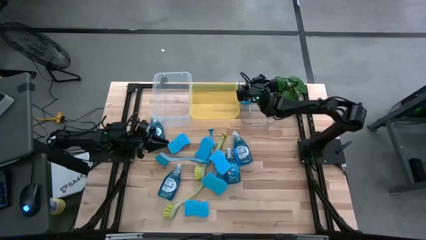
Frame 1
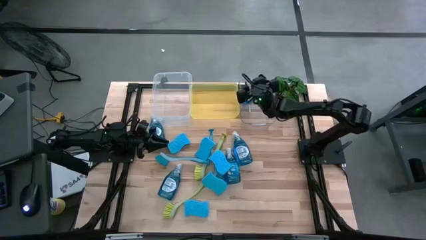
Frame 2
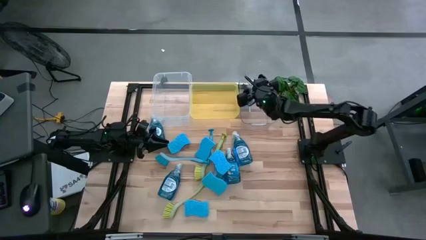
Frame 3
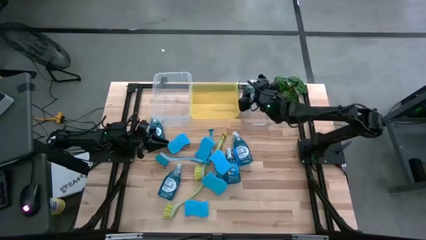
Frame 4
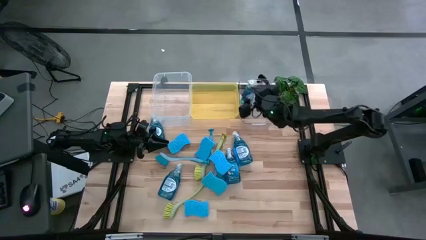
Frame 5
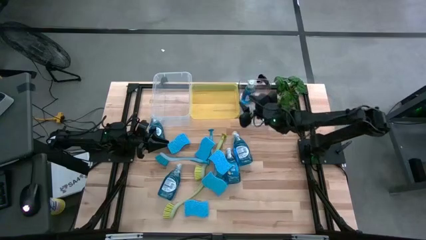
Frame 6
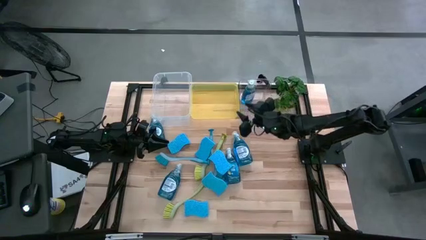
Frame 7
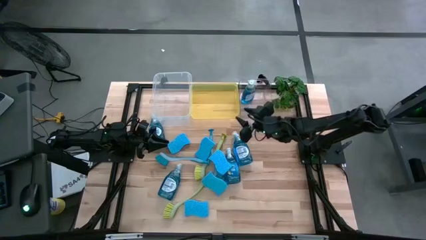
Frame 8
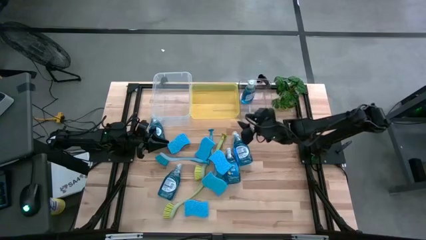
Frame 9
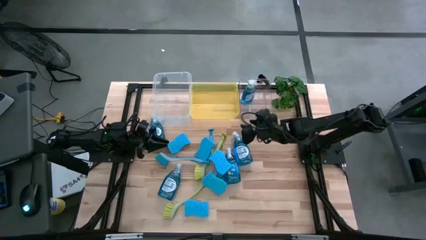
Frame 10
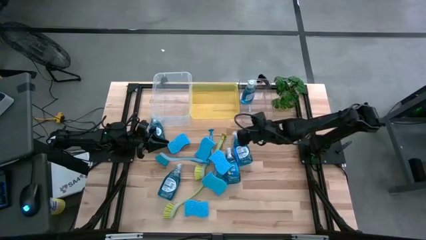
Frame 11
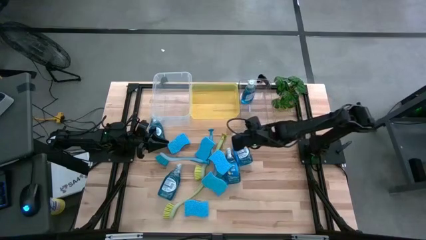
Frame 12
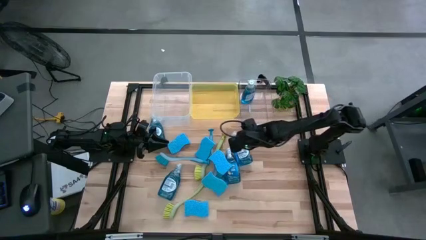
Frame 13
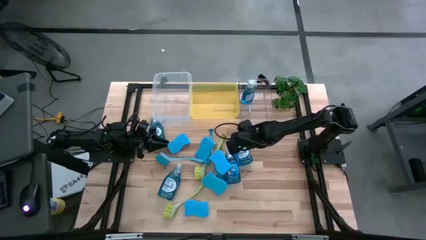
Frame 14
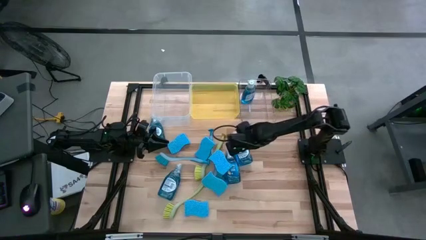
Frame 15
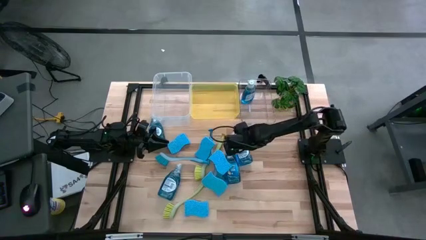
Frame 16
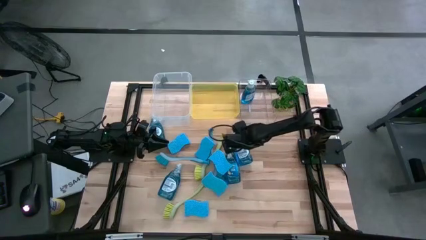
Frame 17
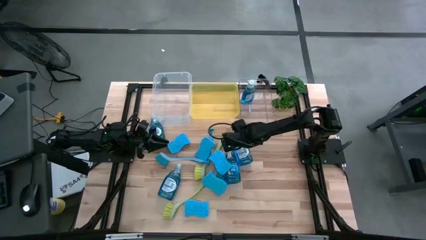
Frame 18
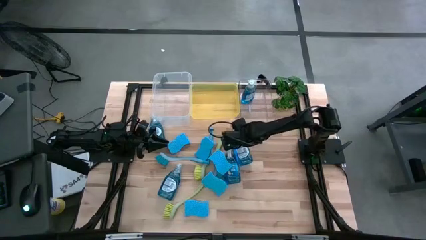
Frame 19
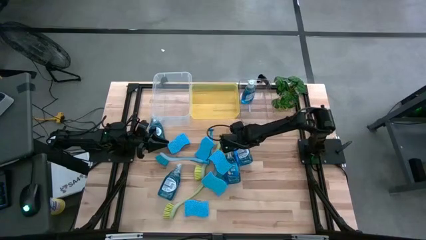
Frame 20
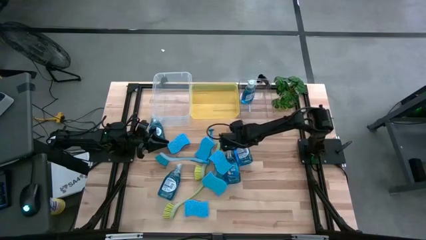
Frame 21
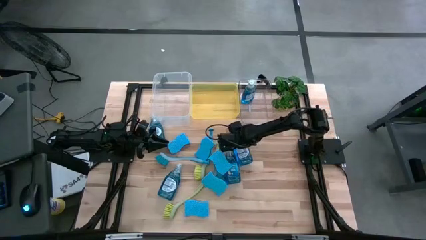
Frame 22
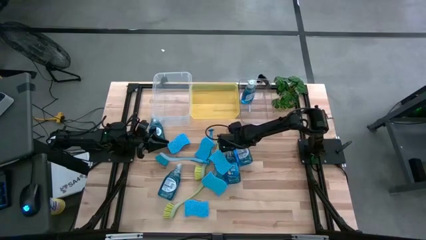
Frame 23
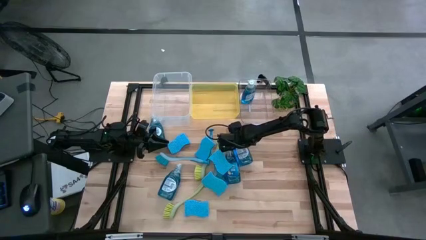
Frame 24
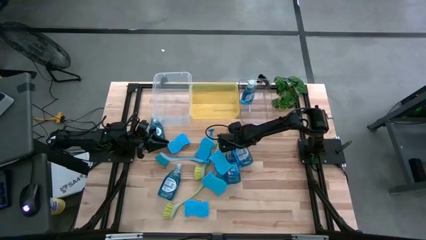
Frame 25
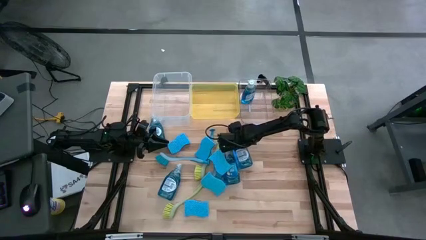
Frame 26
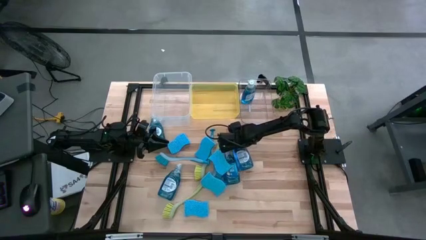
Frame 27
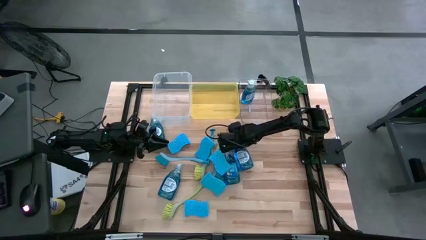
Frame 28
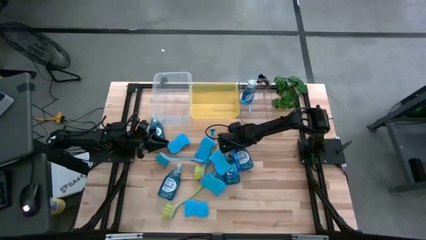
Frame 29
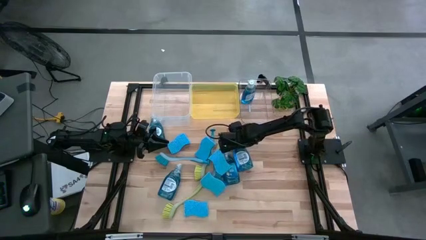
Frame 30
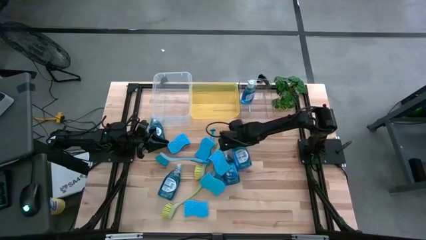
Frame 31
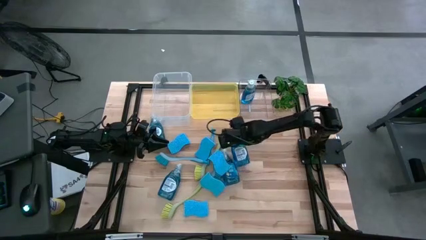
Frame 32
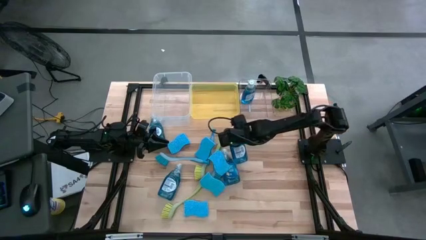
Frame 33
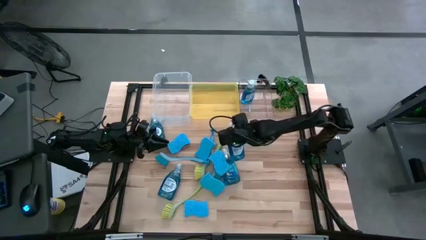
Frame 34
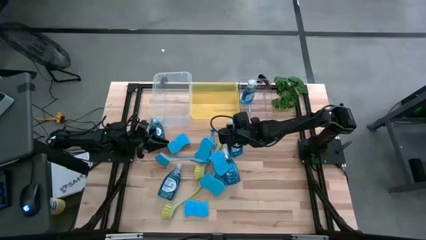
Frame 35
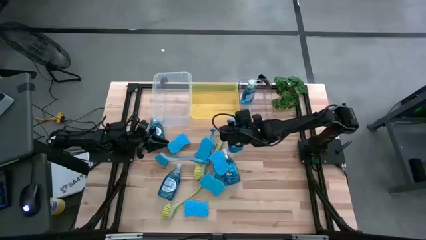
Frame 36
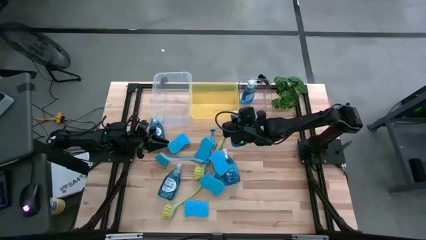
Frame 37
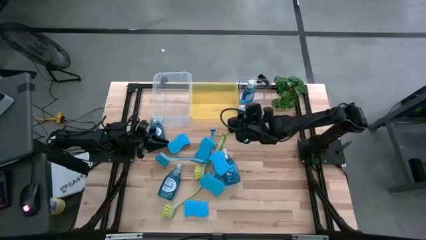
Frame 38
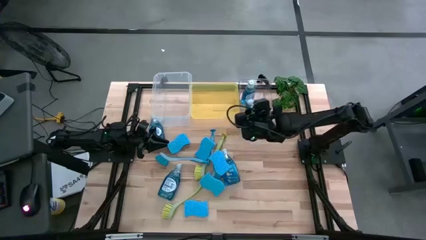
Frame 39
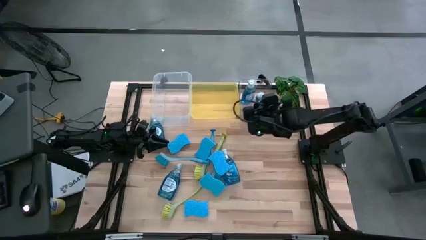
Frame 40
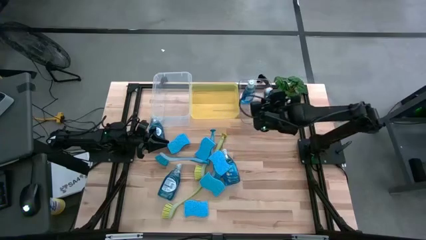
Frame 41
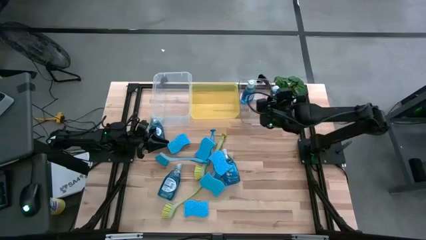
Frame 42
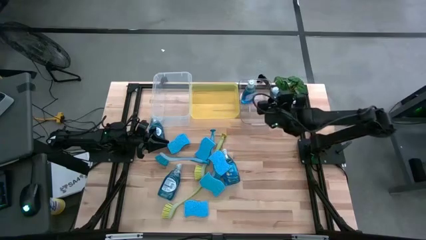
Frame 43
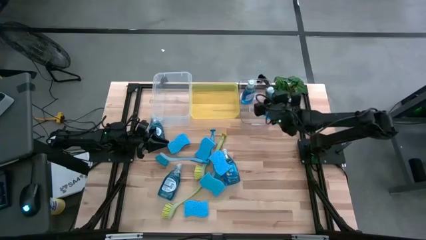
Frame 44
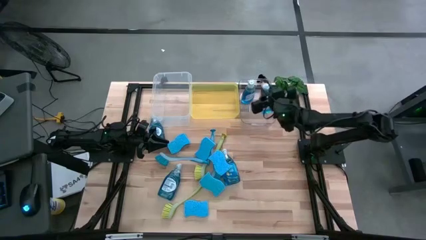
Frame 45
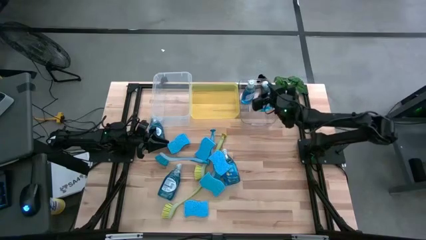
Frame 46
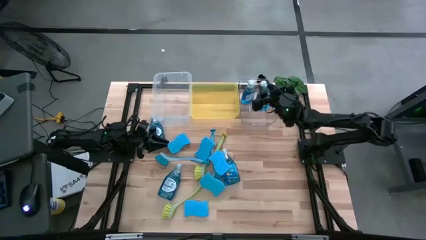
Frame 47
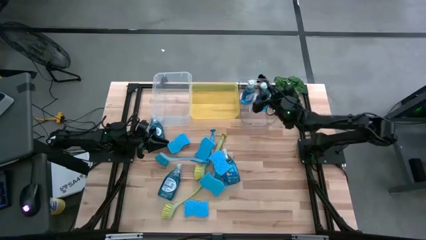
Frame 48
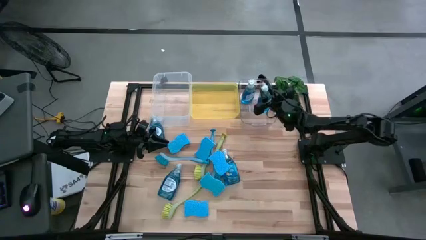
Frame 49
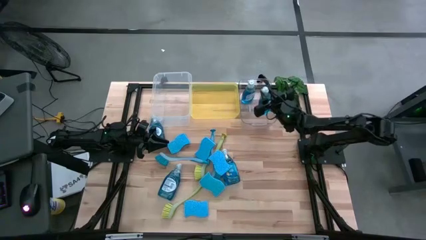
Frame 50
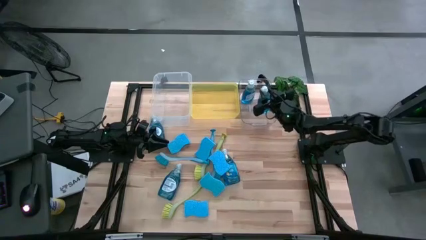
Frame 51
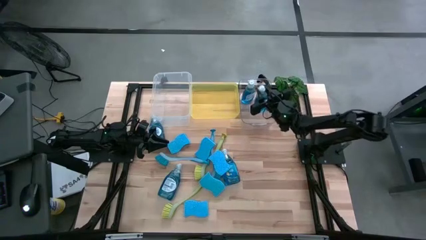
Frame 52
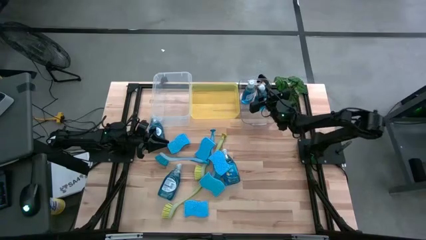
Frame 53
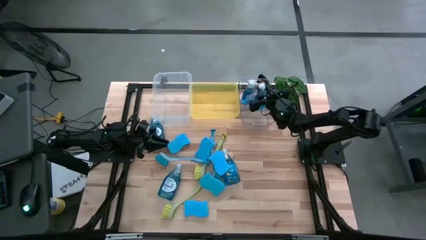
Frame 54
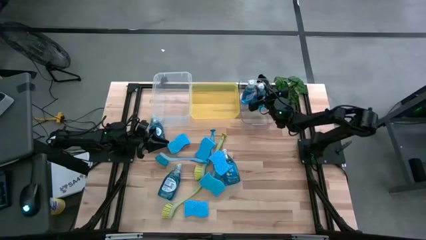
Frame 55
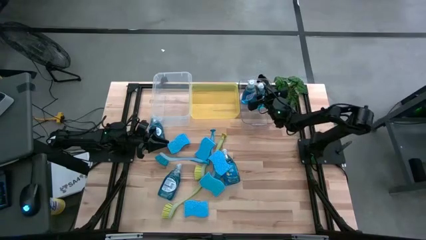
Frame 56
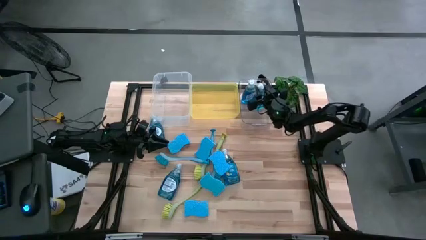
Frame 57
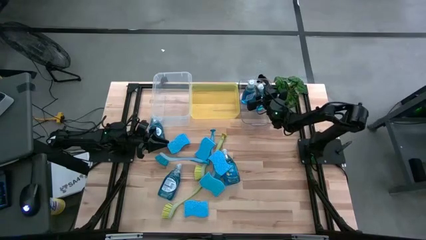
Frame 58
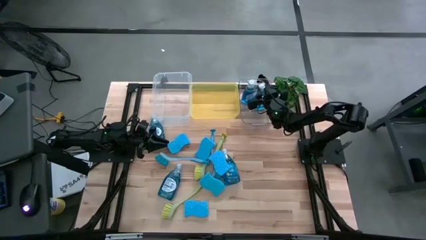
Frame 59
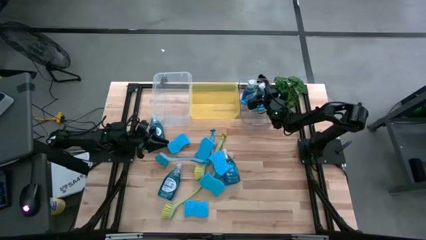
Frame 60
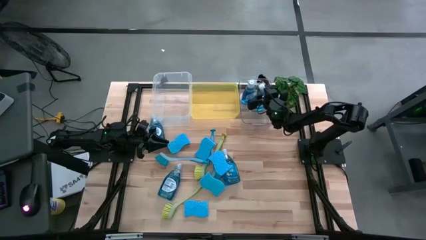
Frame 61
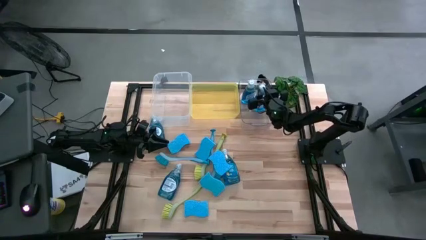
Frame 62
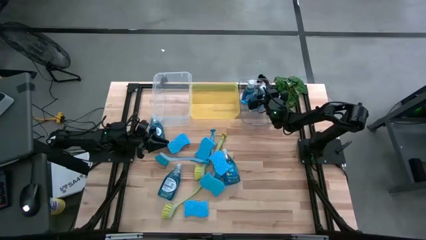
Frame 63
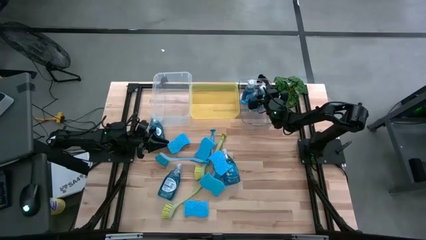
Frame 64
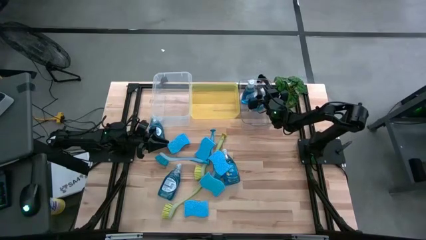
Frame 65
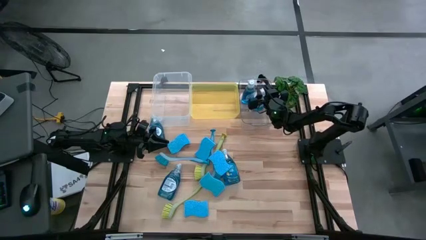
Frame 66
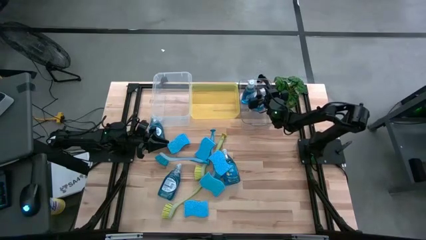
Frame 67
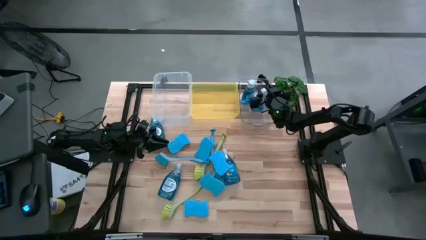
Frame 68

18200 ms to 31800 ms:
Task: Pick & Place Kitchen Sink Supplies
Put the blue dishwasher liquid into the transparent bin
